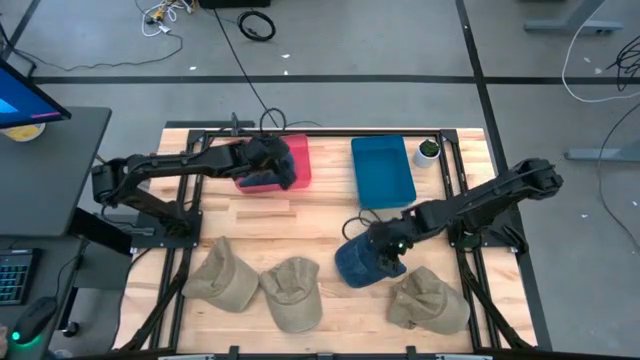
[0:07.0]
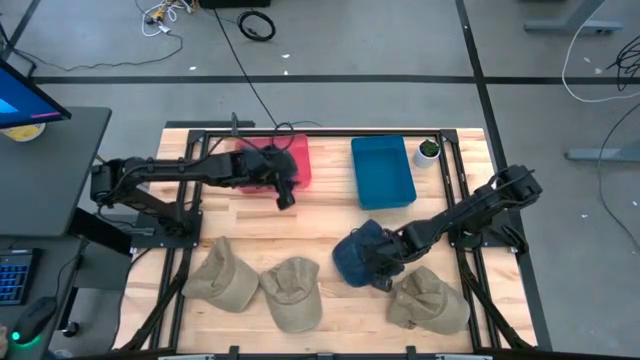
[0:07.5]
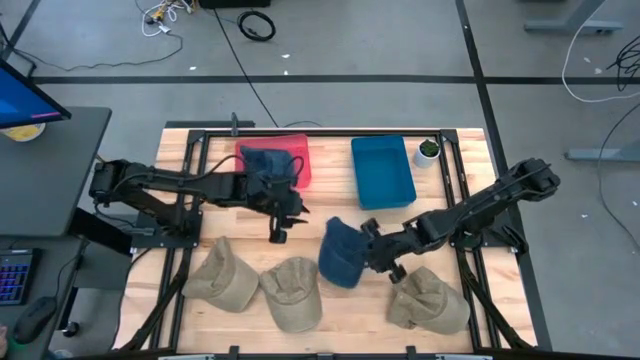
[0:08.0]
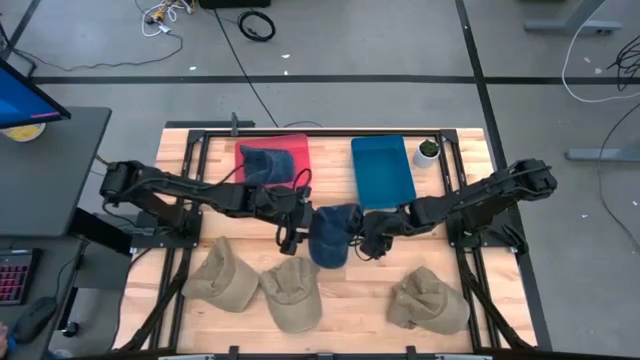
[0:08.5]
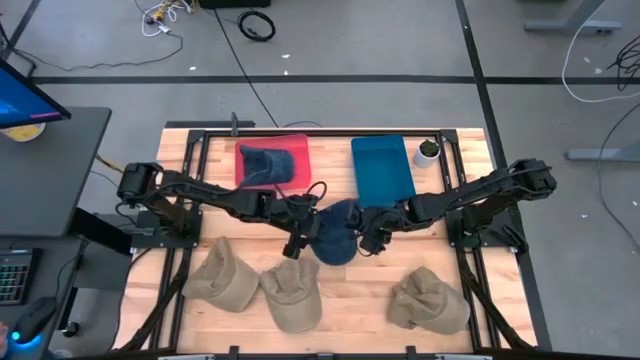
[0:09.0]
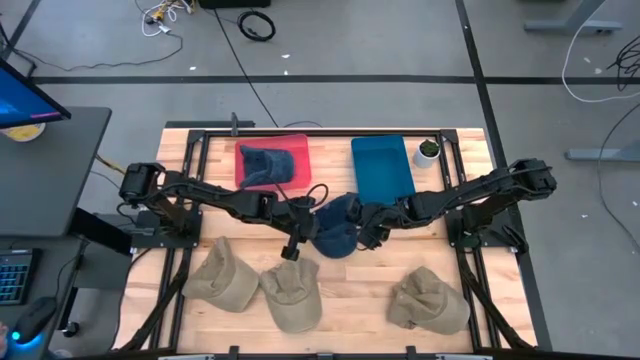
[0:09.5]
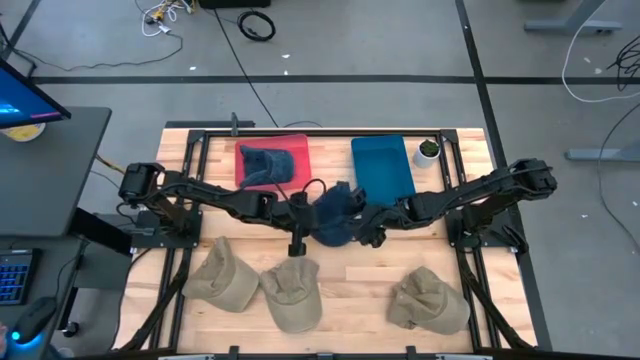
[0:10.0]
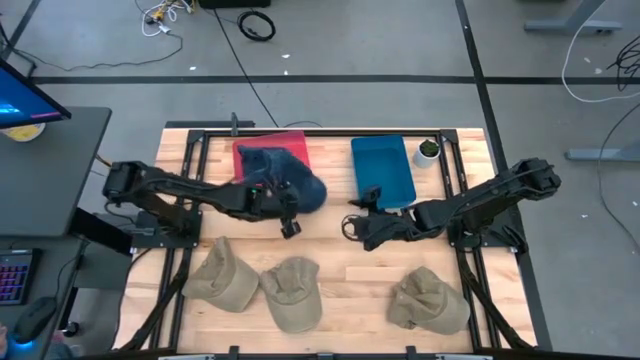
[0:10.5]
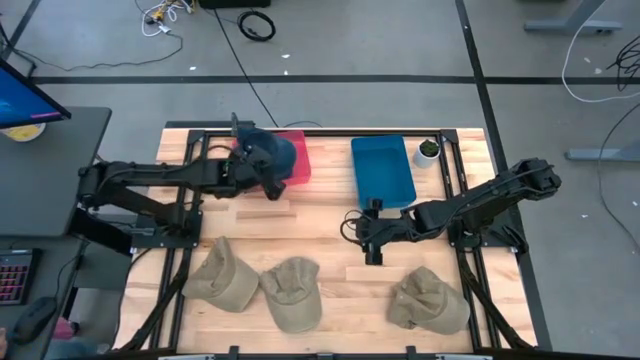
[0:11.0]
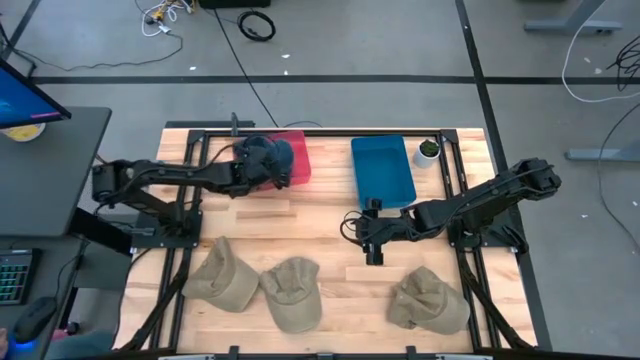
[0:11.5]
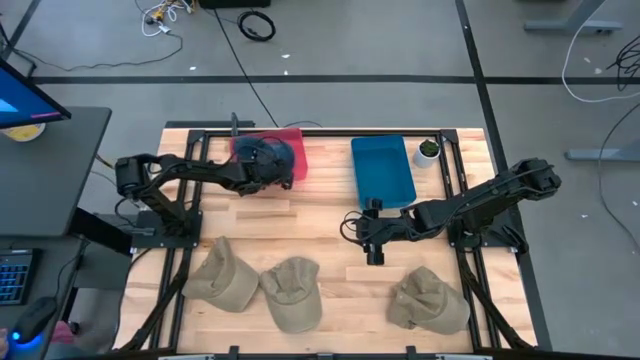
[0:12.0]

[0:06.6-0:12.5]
Task: Pick & Place hat
Put the blue cap into the red bin

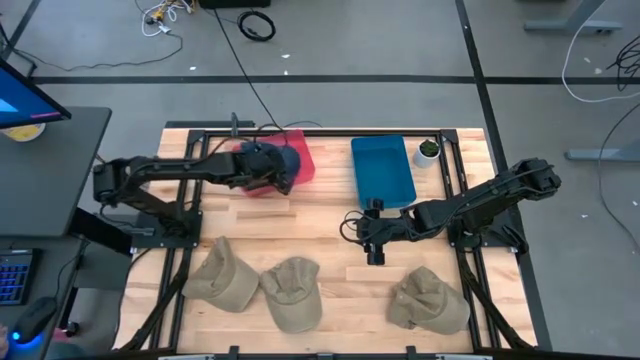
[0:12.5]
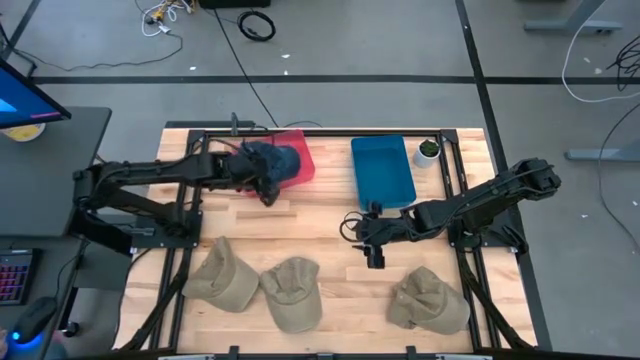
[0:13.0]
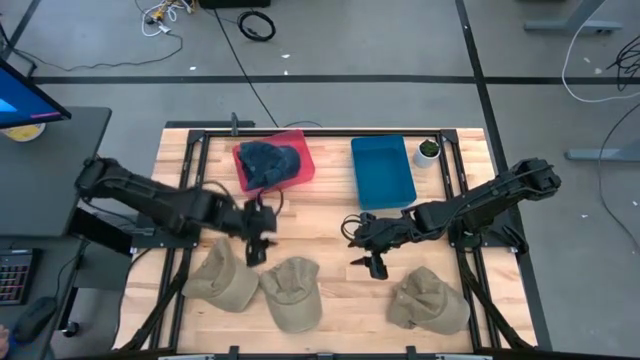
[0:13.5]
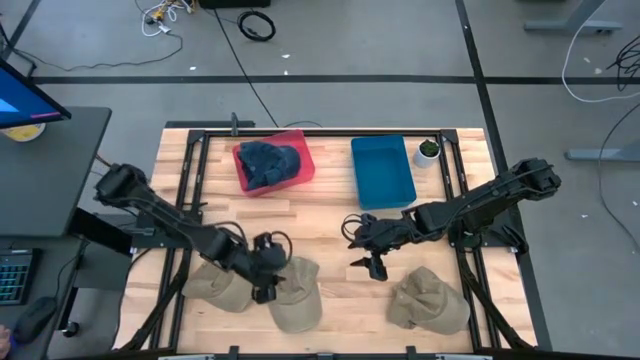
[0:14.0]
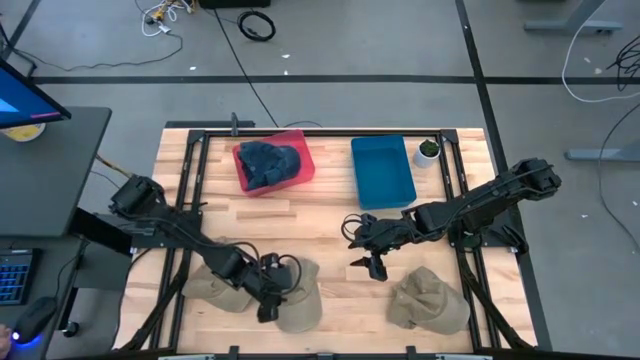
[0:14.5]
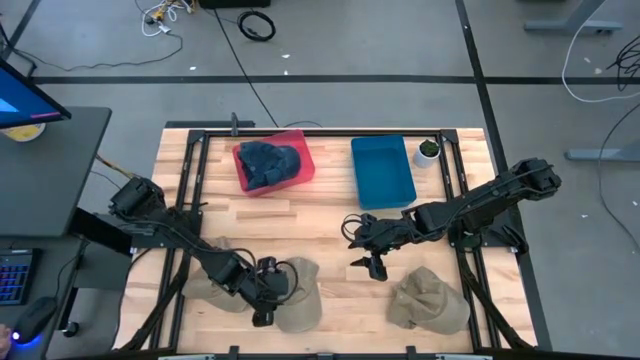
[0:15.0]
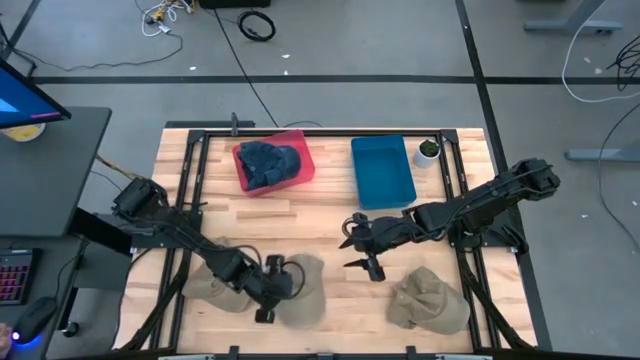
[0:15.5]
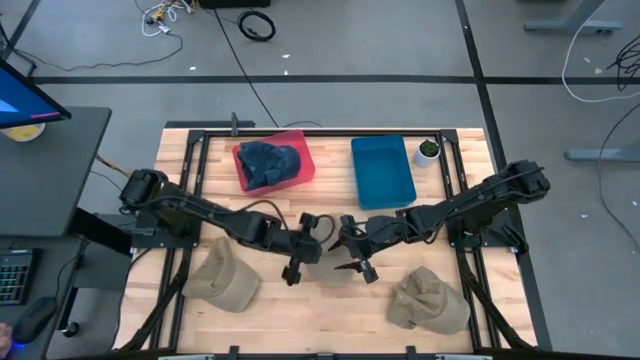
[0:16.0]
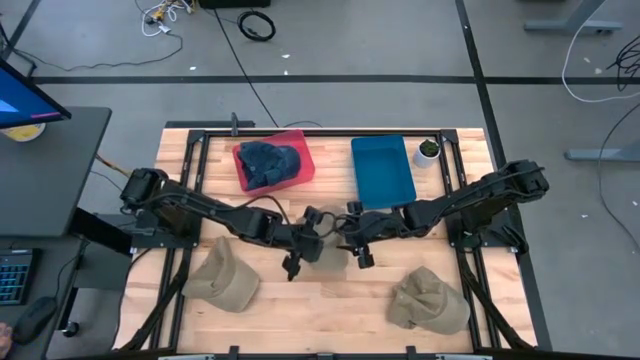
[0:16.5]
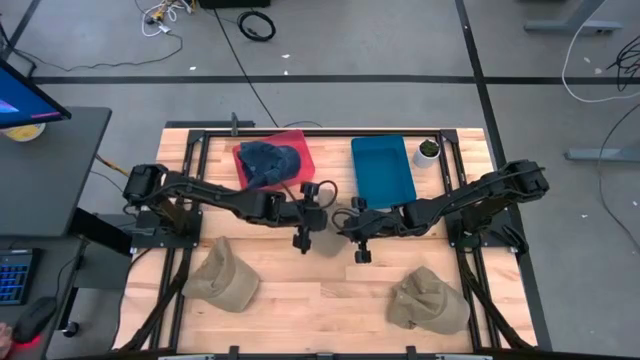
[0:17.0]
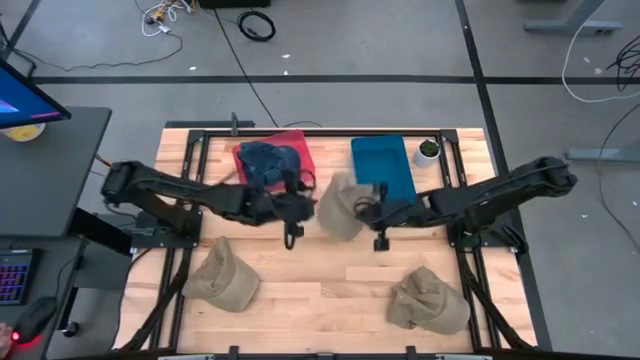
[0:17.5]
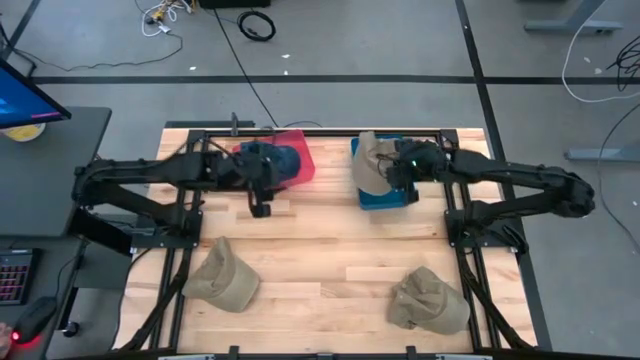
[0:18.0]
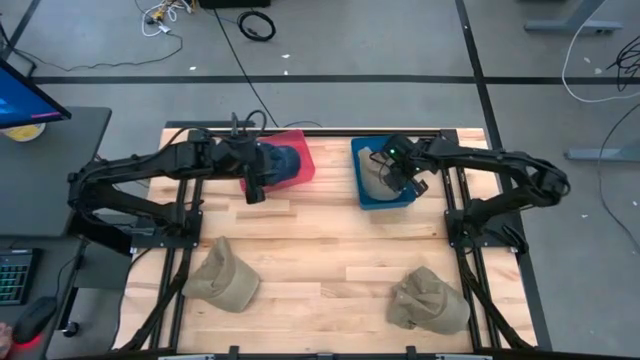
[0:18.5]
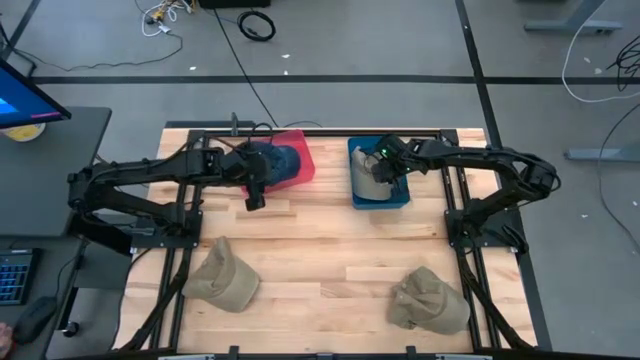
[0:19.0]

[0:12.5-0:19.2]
Put the middle brown cap into the blue bin

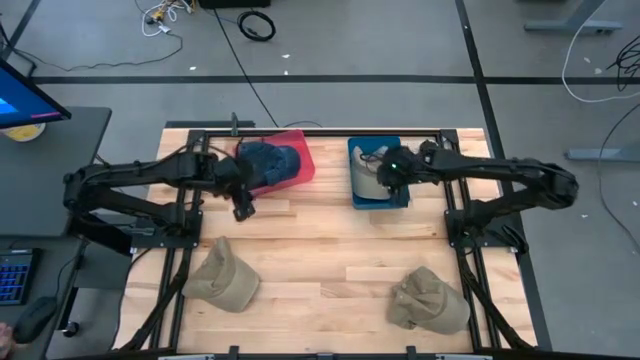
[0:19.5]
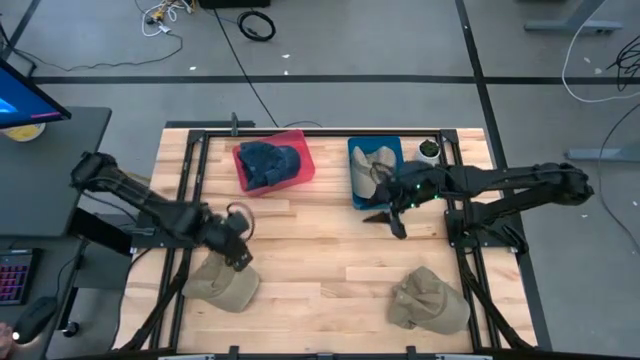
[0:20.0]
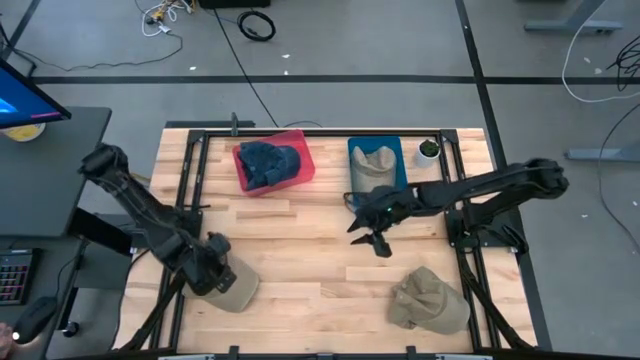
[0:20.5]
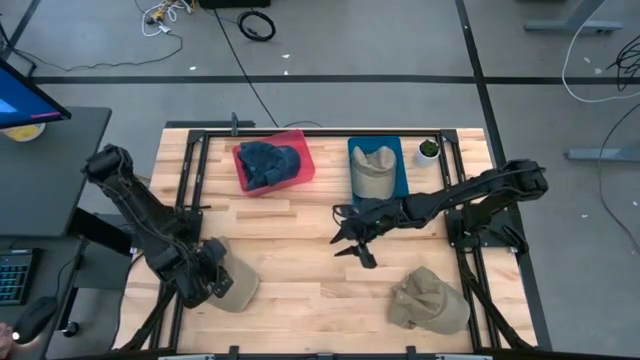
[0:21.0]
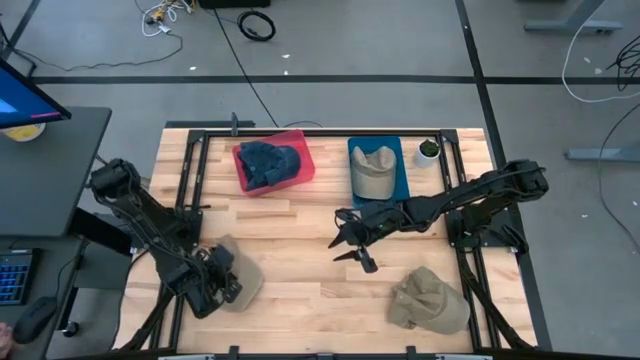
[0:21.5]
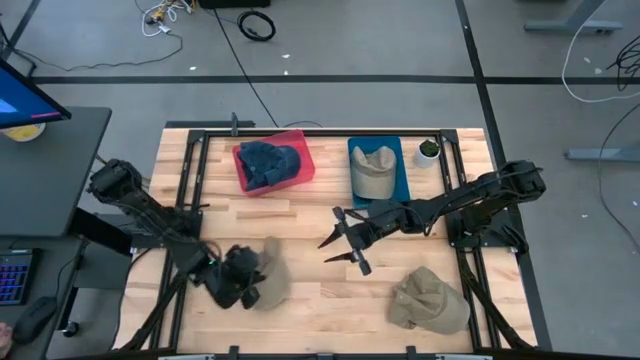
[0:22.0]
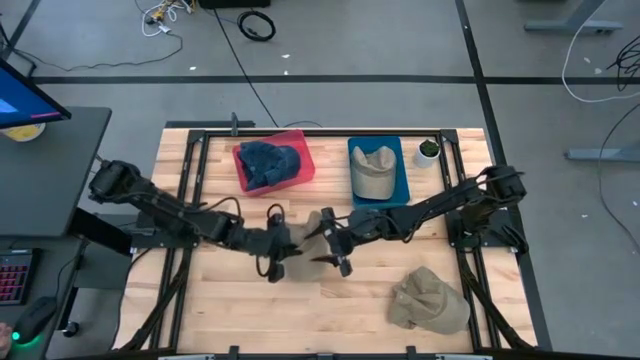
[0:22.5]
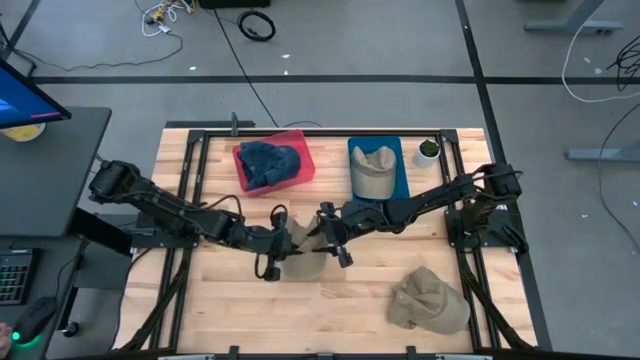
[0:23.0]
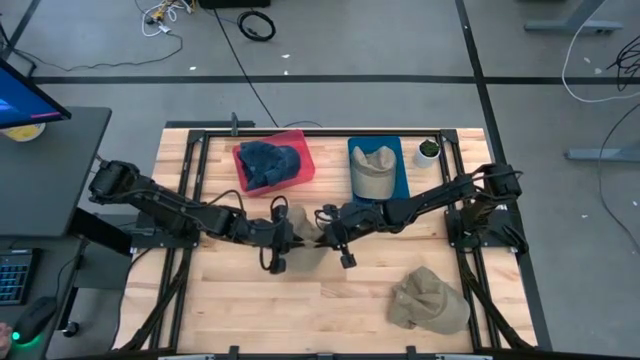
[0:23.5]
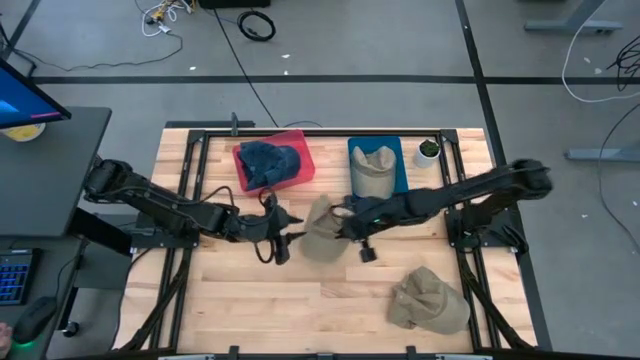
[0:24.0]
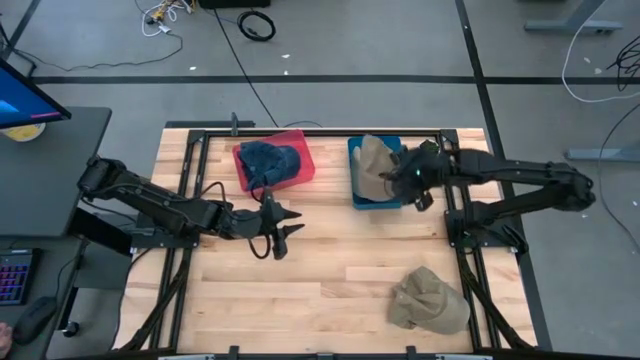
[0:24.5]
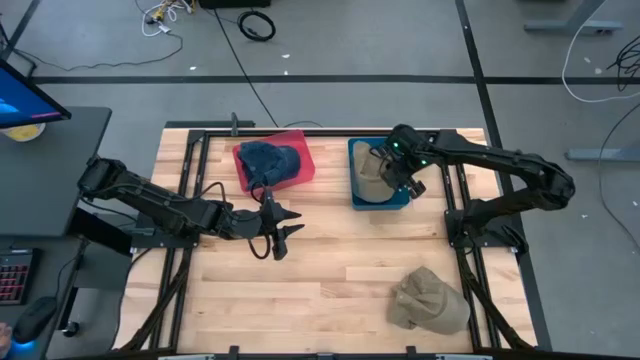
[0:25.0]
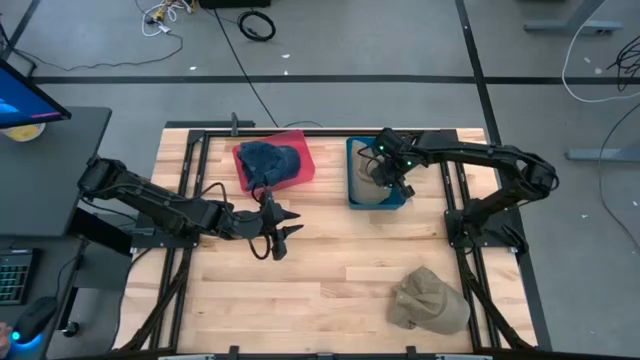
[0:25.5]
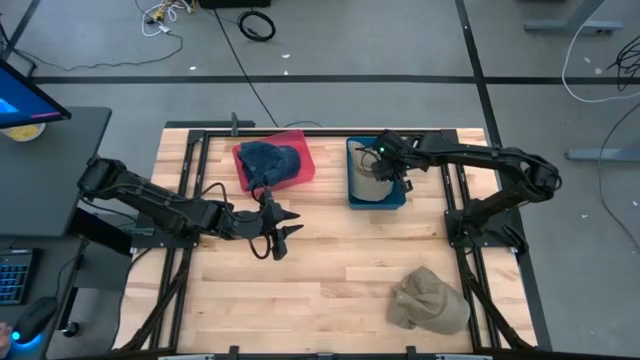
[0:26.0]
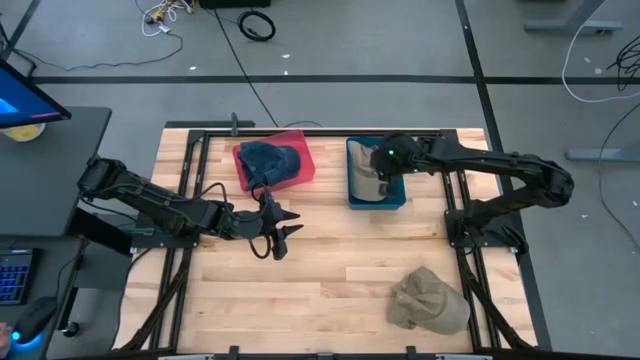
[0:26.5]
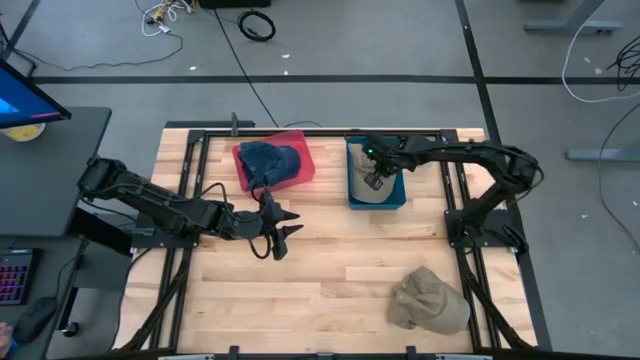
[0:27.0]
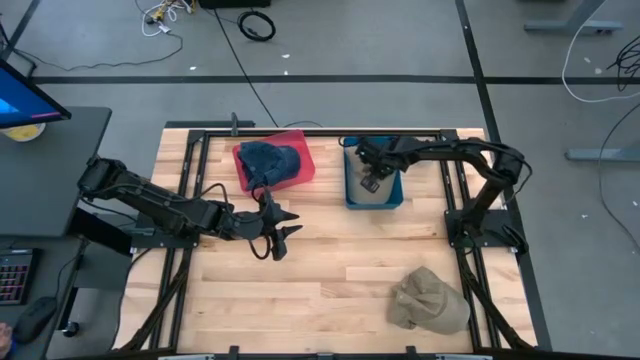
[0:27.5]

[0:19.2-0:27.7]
Put the left brown cap into the blue bin

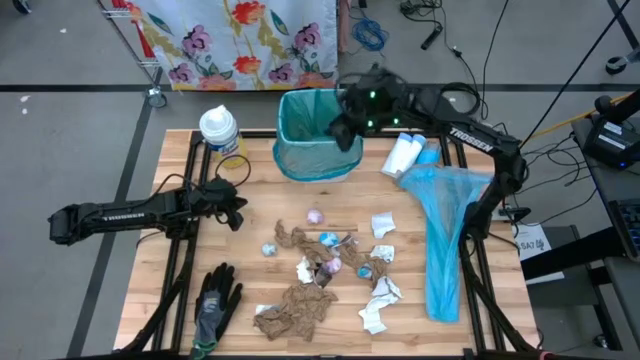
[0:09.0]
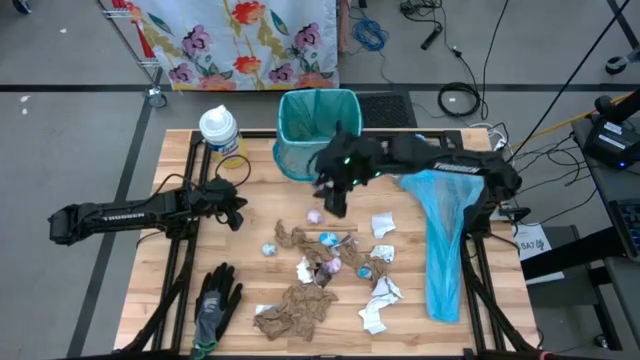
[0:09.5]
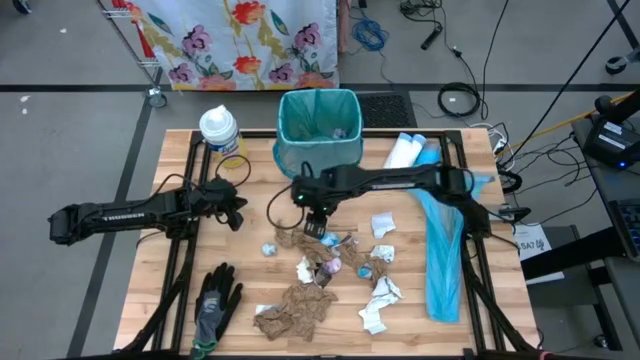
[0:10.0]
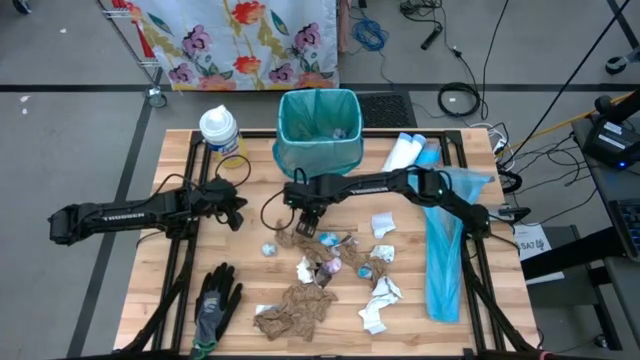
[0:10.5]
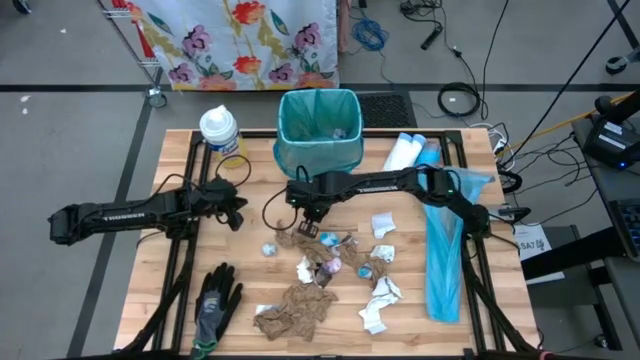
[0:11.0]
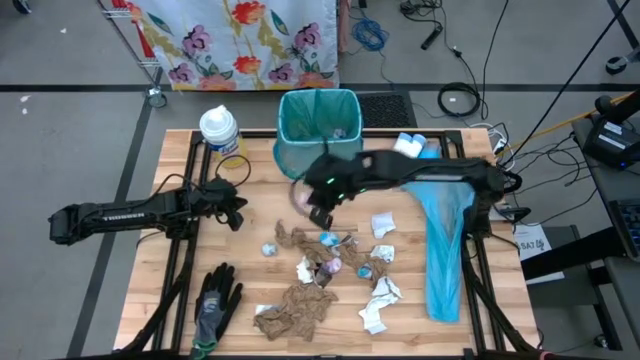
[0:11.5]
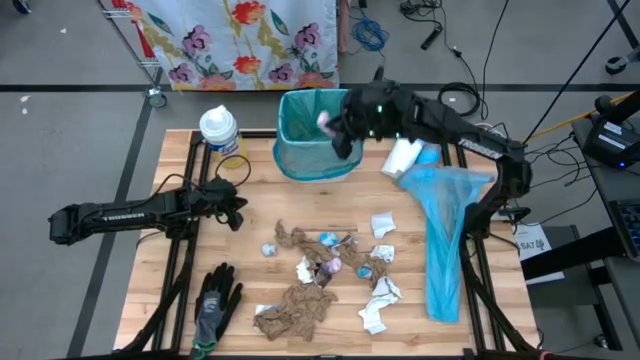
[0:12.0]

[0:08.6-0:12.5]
Task: place trash/remove bag and relplace
Put the pink bag into the white trash bin
